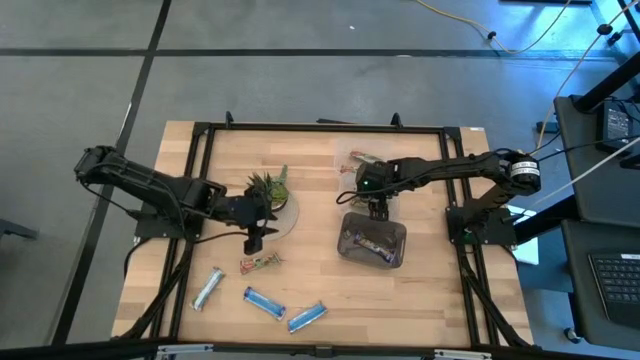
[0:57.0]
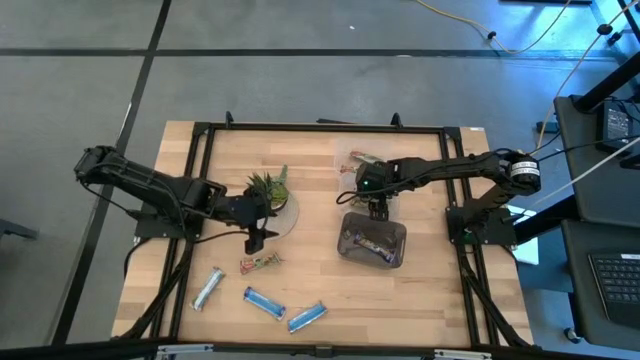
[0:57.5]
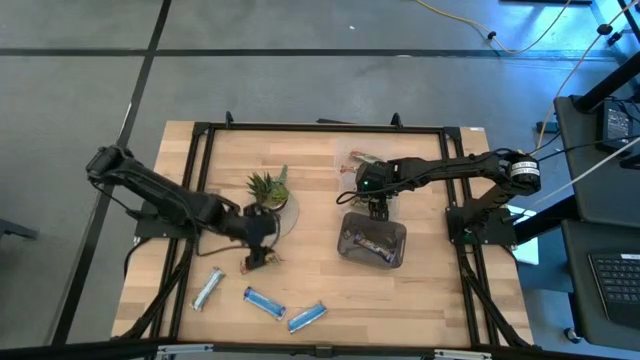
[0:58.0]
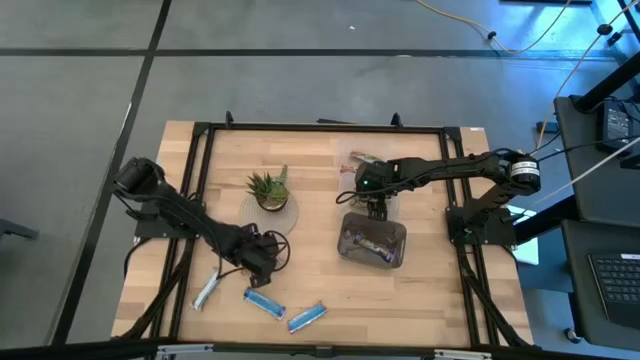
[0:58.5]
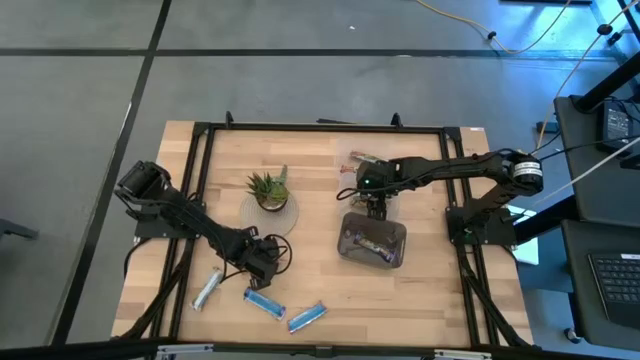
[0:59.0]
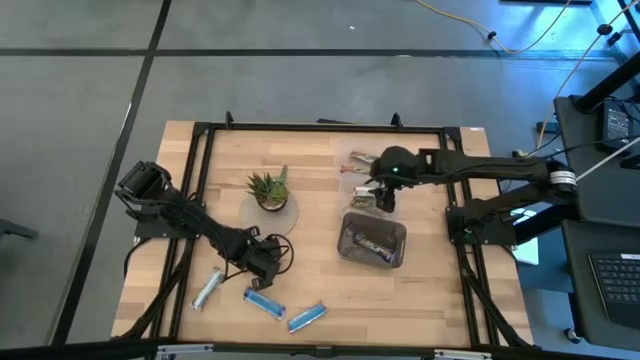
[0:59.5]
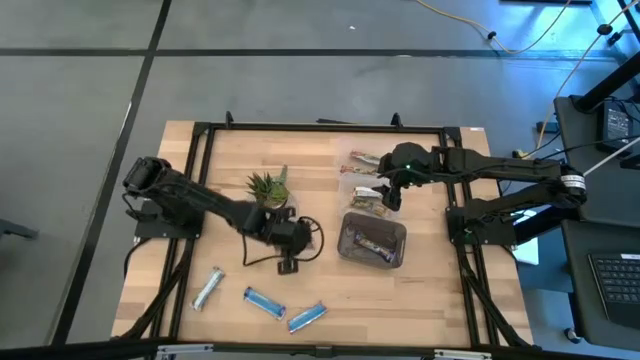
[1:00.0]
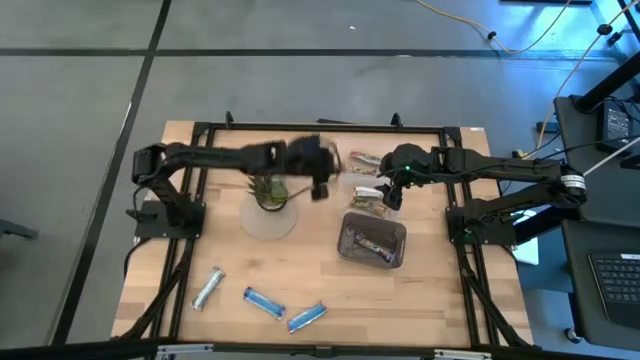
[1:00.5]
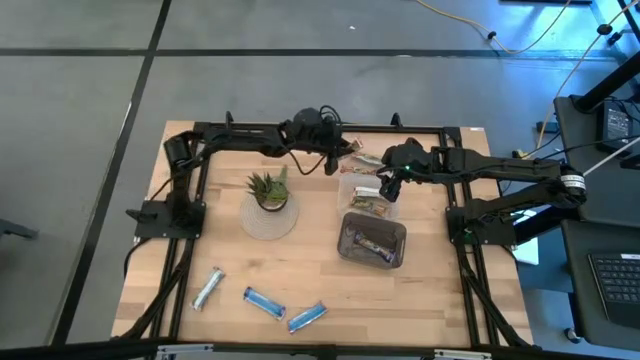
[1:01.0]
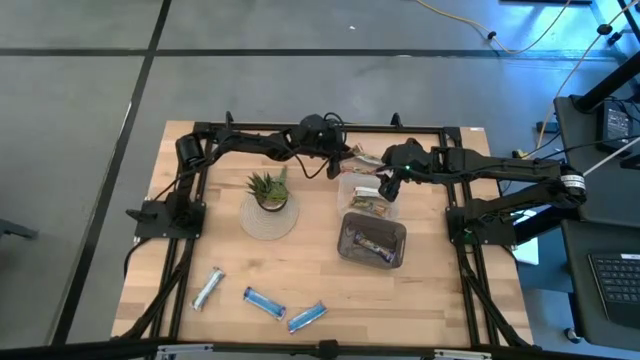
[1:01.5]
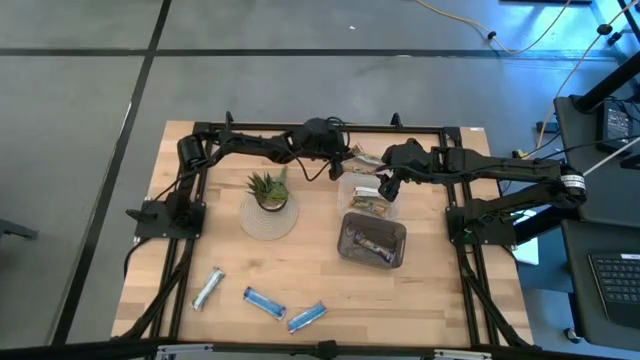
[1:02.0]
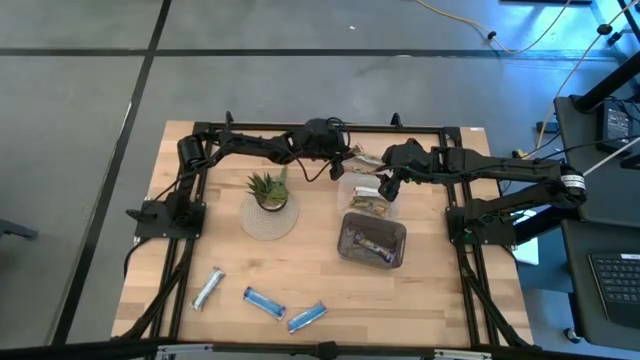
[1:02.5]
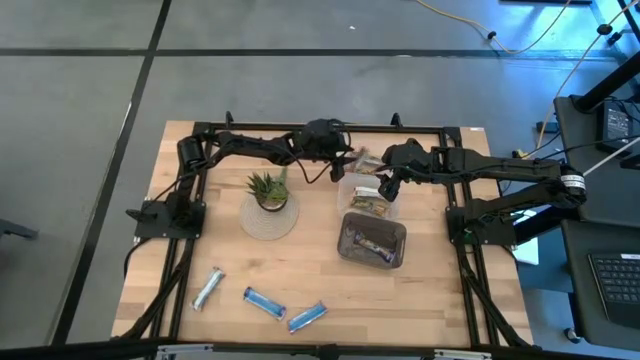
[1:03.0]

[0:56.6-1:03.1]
Task: Pick and place Granola Bars by type
Put the top red granola bar into the top transparent bin

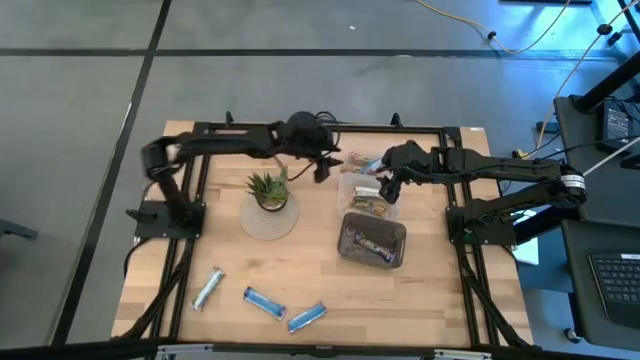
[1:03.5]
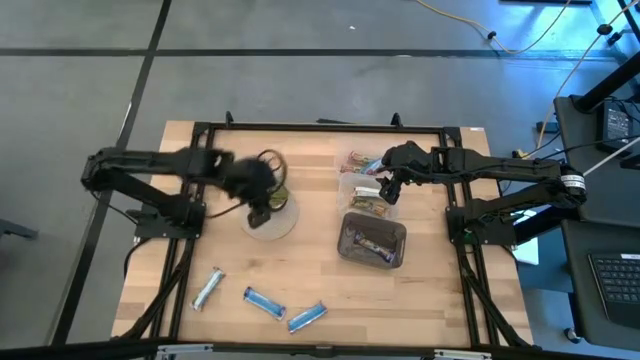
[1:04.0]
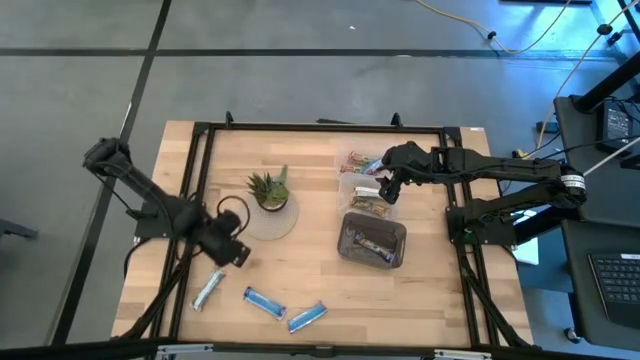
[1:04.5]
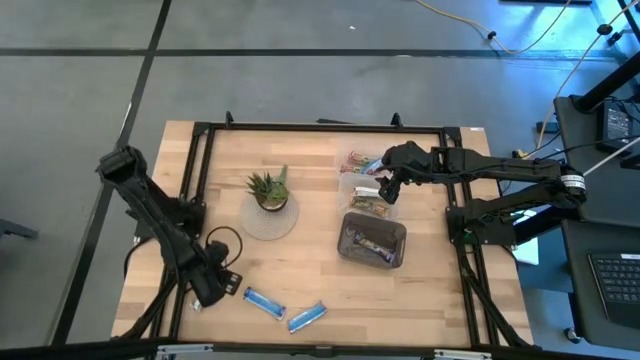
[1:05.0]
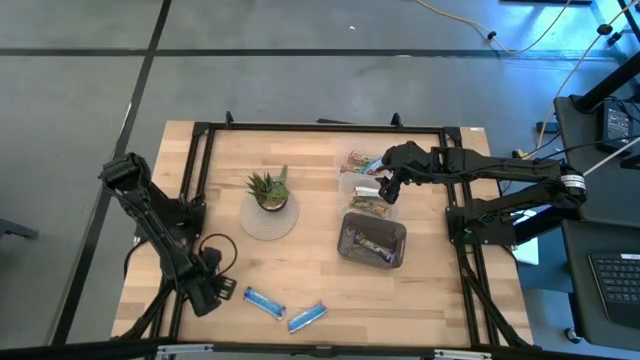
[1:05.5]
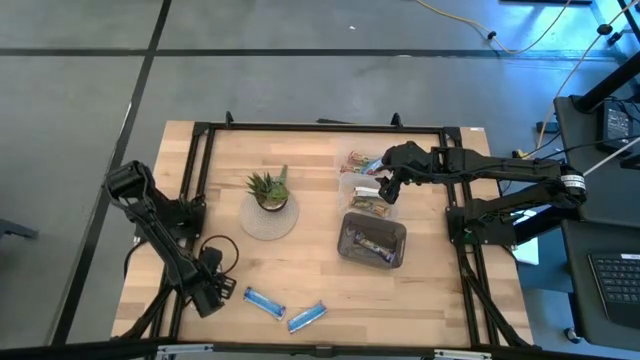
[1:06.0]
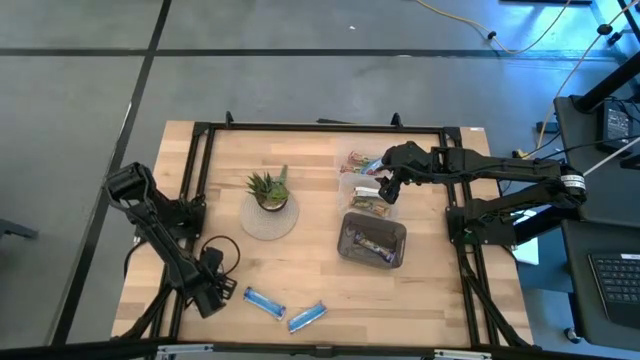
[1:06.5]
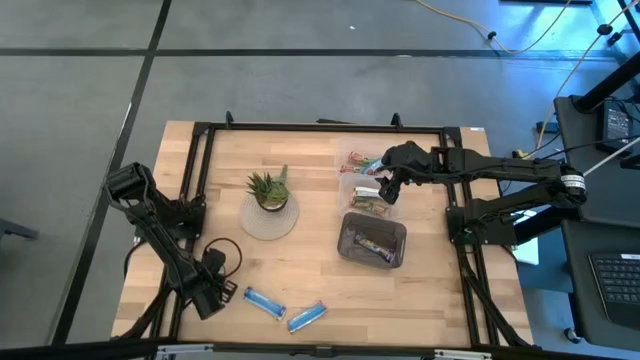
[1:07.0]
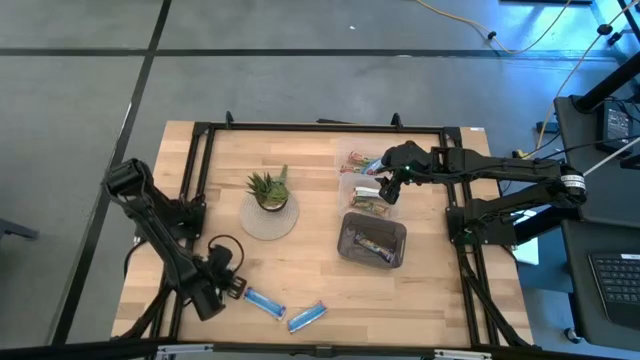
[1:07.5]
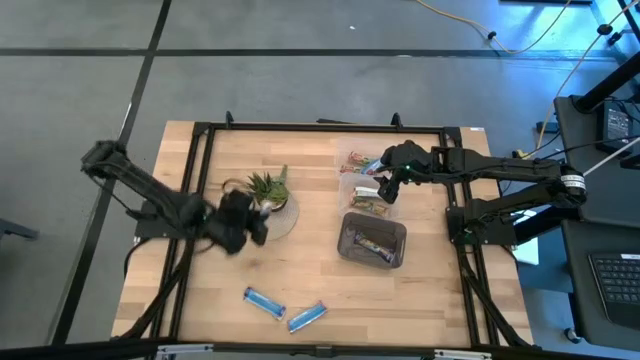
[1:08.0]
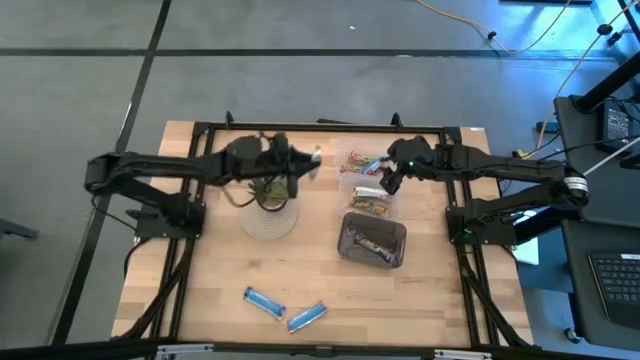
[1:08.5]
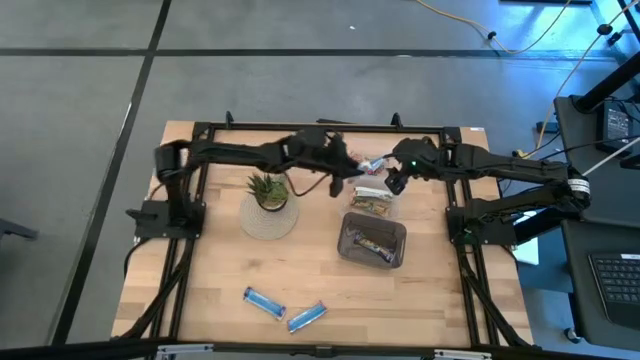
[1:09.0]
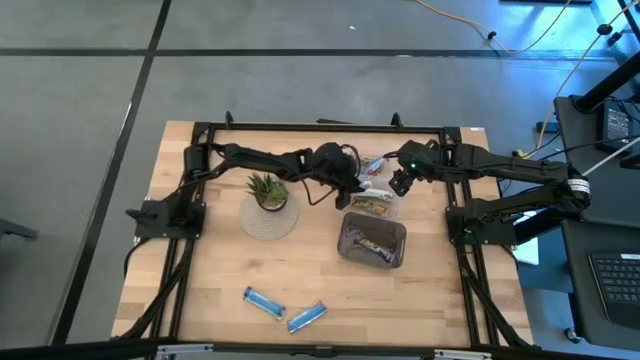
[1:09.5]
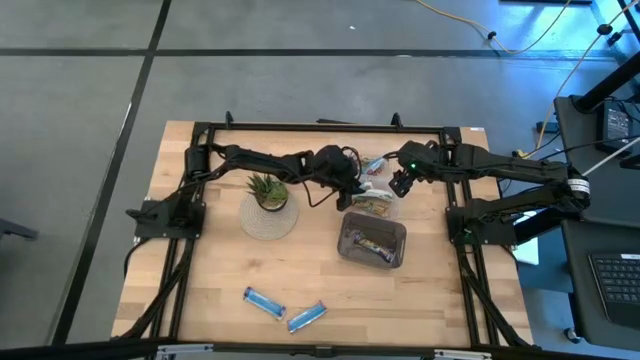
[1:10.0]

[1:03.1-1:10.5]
Put the yellow granola bar into the bottom transparent bin

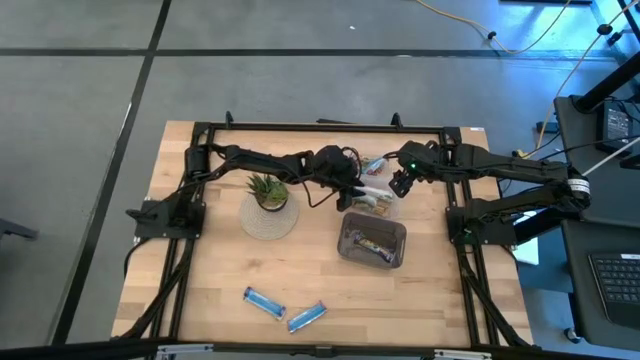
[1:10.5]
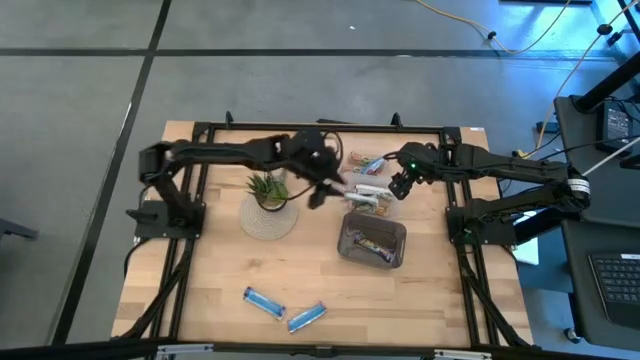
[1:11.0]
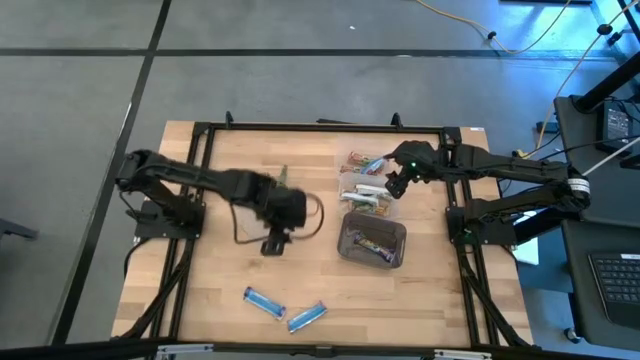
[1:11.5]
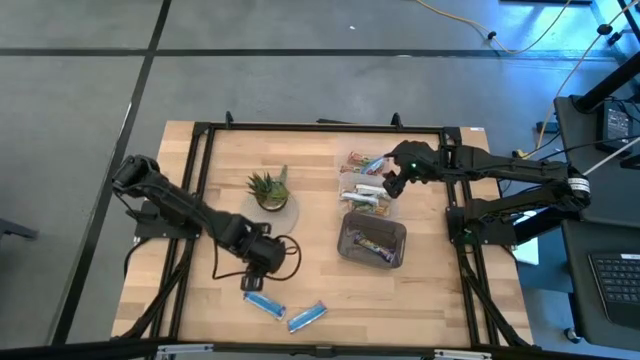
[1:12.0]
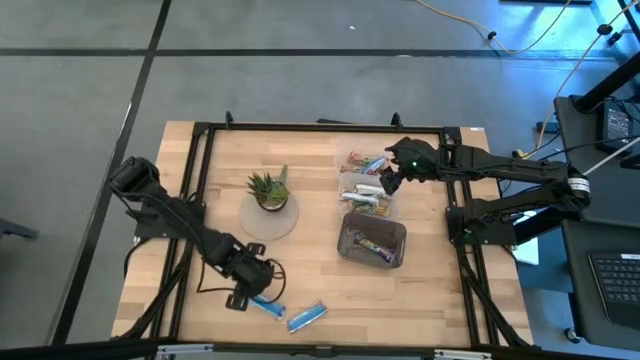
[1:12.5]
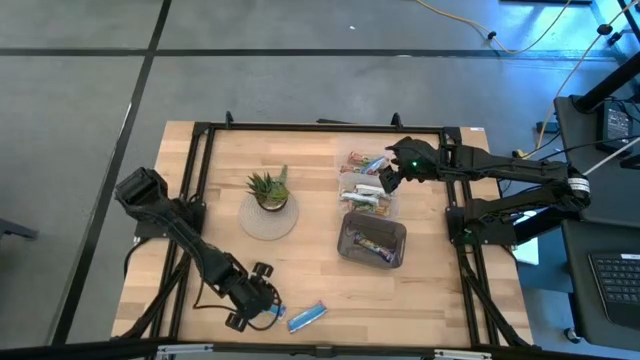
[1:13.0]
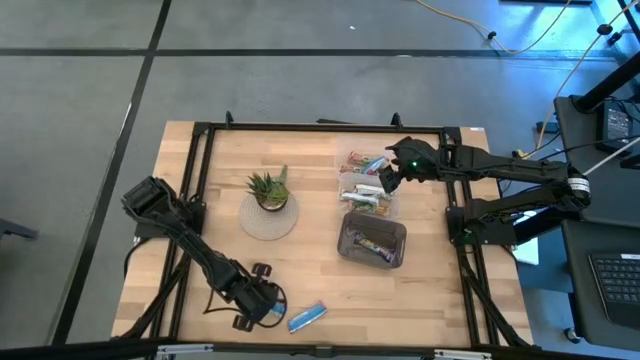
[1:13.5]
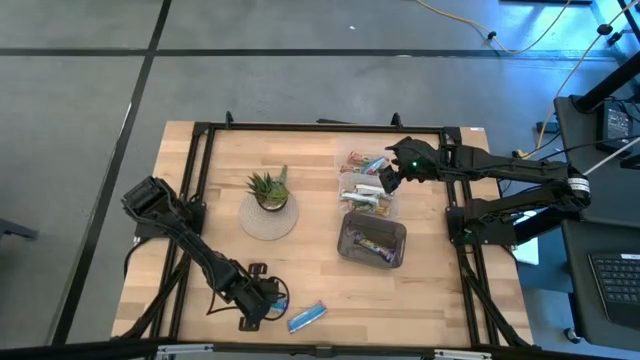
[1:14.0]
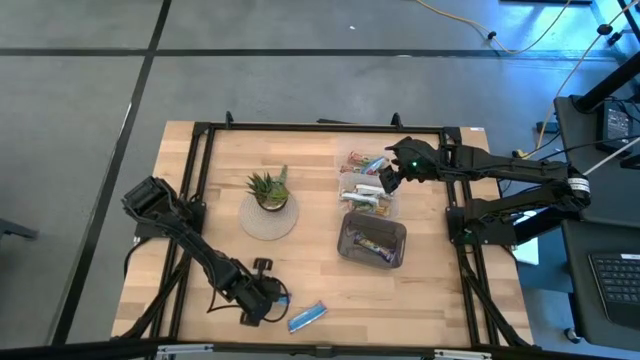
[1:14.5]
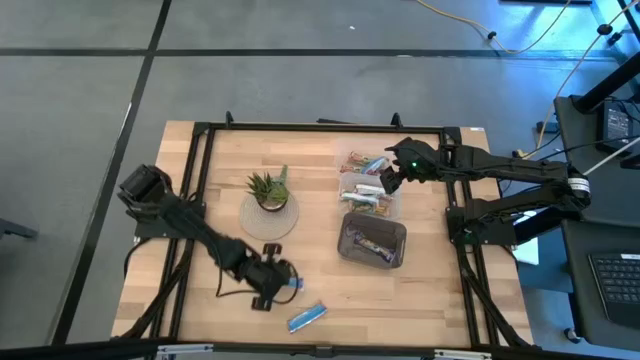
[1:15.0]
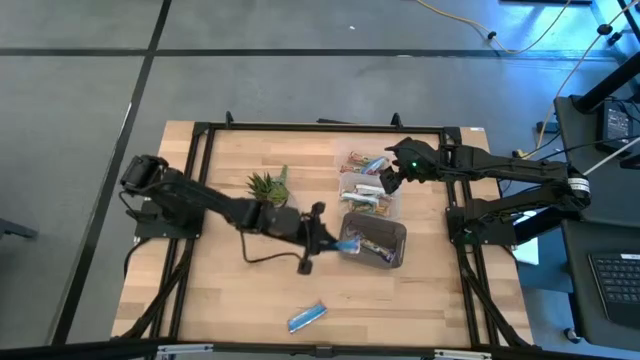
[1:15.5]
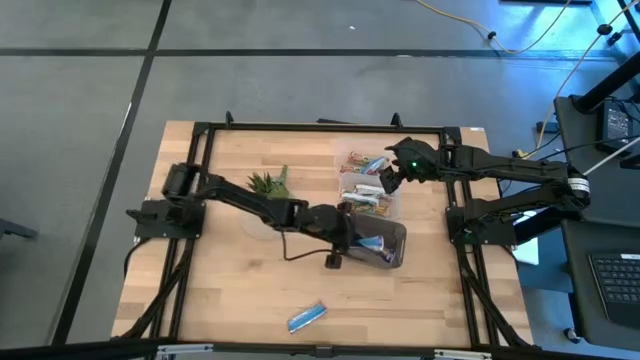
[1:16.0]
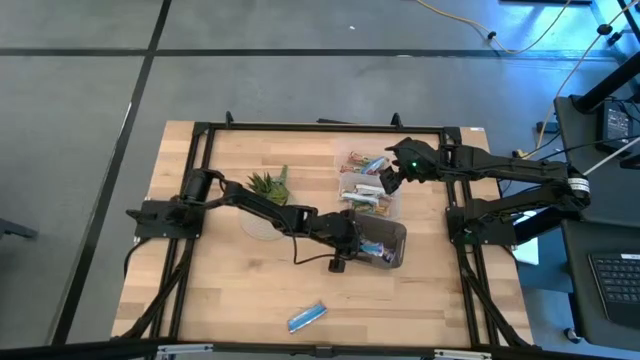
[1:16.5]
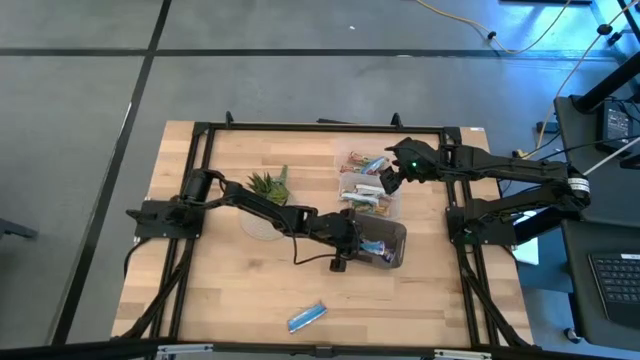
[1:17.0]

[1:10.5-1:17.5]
Put the blue granola bar into the black bin
